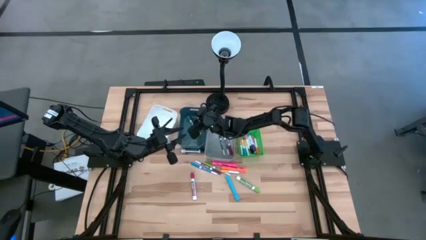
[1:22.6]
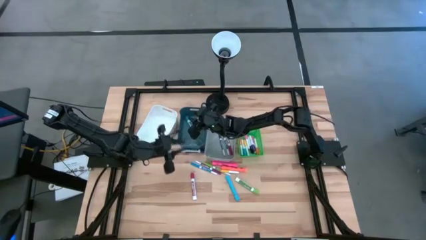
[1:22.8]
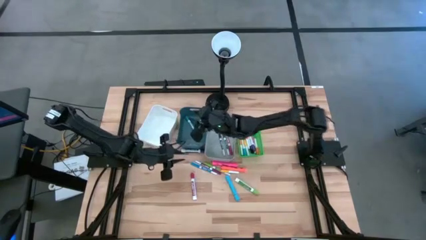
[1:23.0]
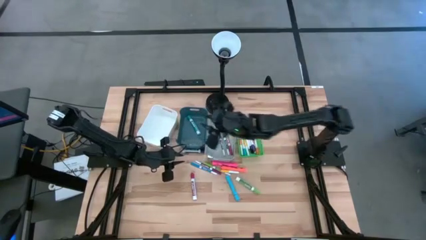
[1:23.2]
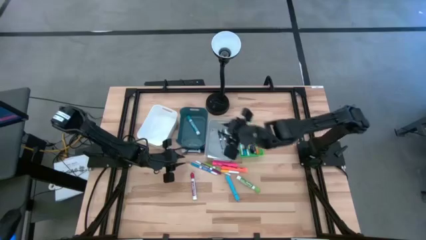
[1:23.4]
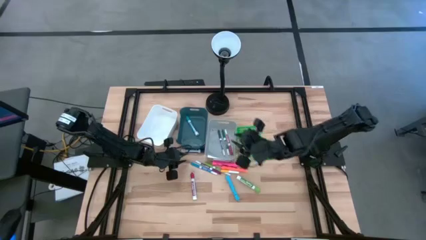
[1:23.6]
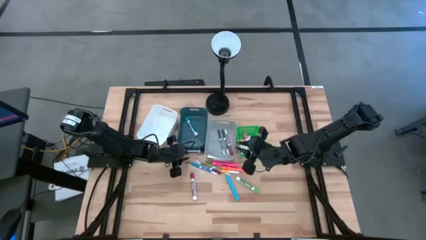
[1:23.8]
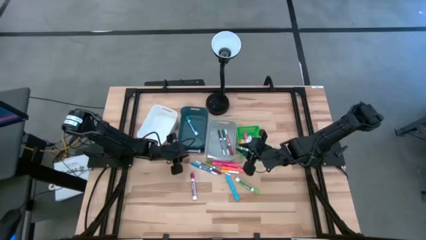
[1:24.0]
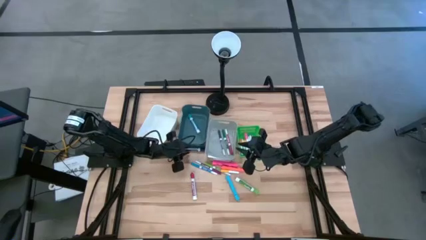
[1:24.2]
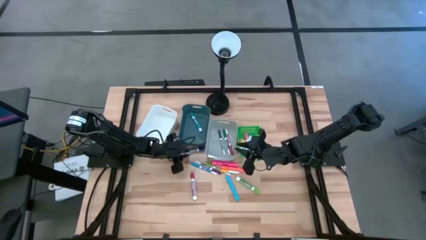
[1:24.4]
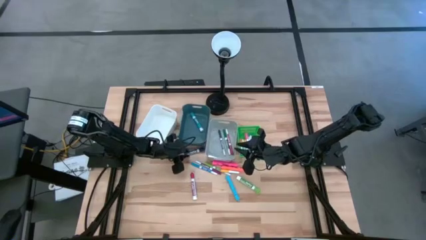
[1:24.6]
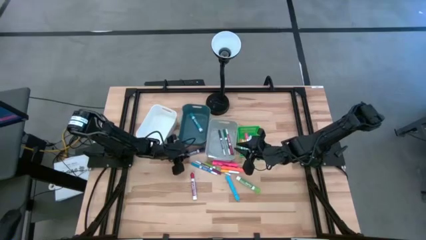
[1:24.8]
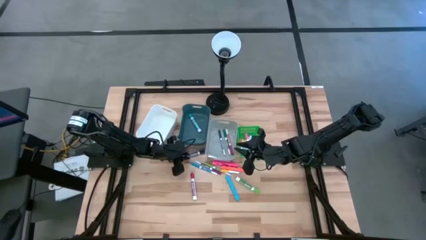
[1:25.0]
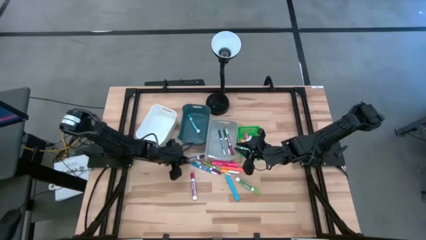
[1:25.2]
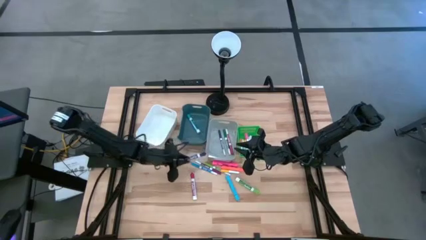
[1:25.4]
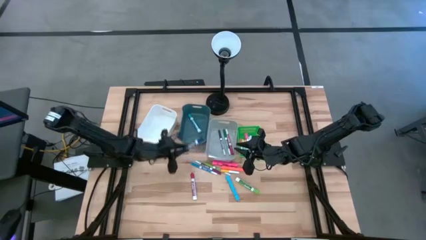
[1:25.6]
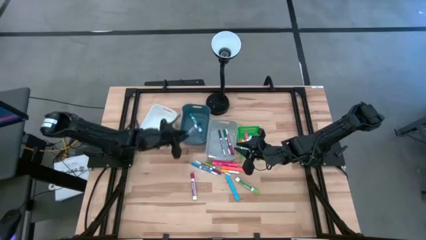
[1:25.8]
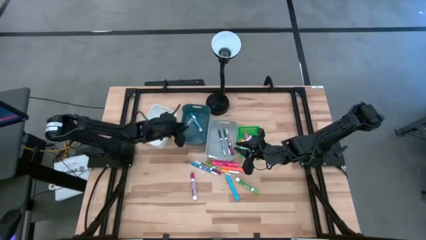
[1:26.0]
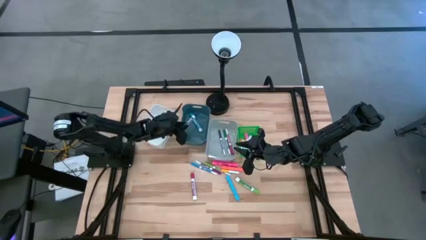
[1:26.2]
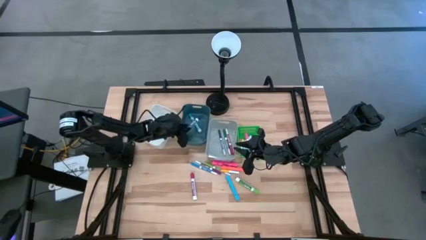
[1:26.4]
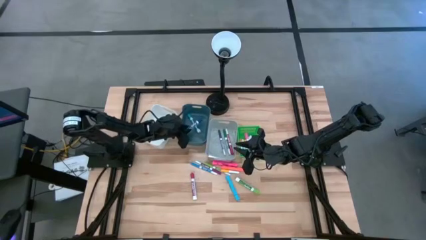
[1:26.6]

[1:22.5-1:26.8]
Task: Pick & Place Markers
Put the large dark blue marker pen into the blue bin

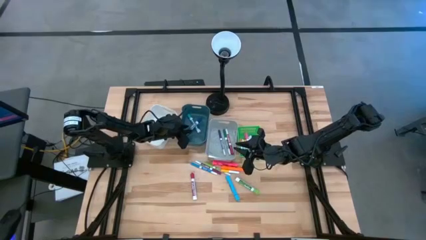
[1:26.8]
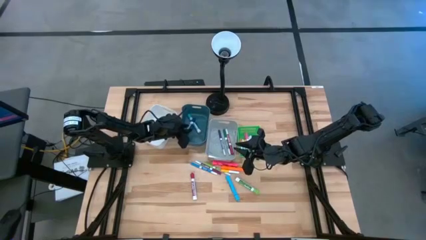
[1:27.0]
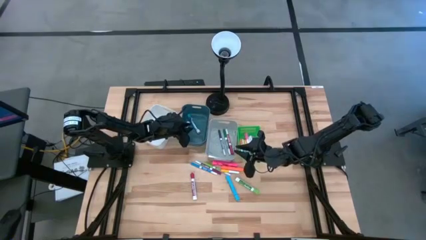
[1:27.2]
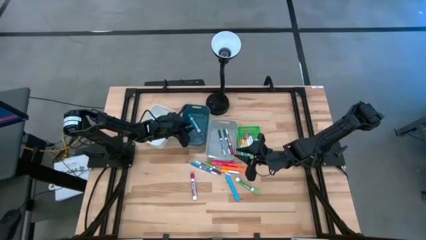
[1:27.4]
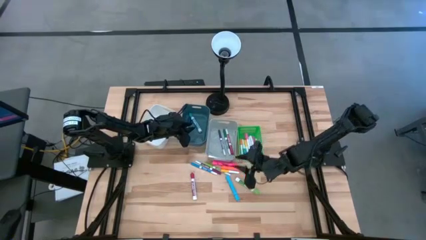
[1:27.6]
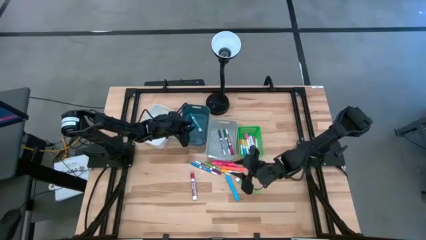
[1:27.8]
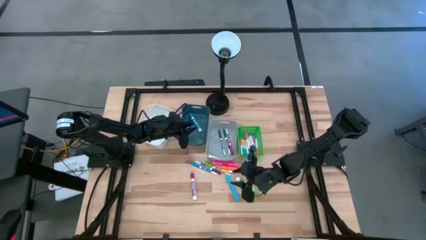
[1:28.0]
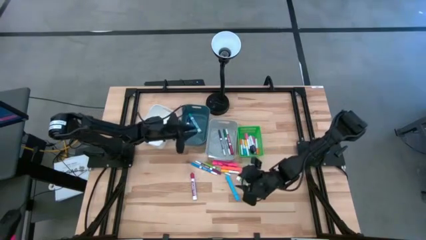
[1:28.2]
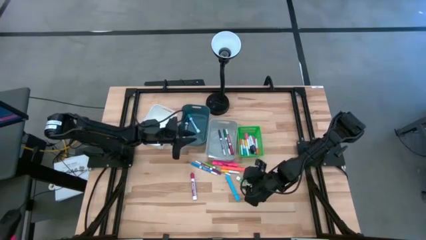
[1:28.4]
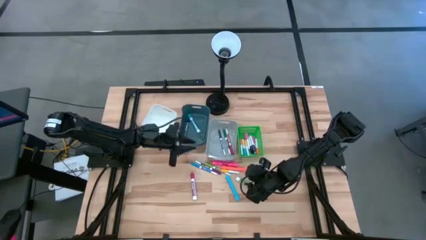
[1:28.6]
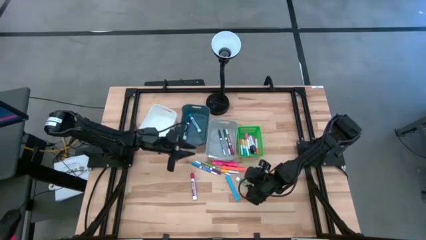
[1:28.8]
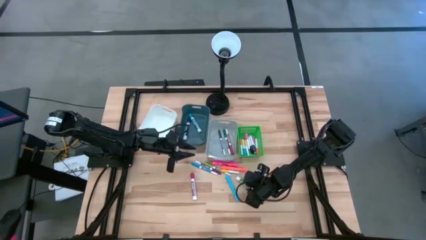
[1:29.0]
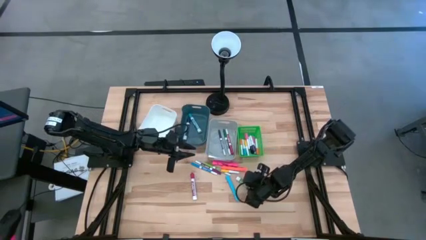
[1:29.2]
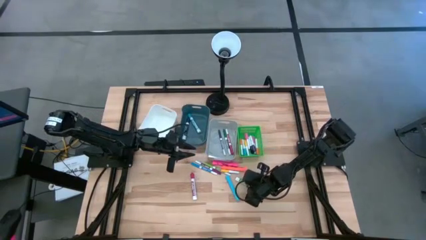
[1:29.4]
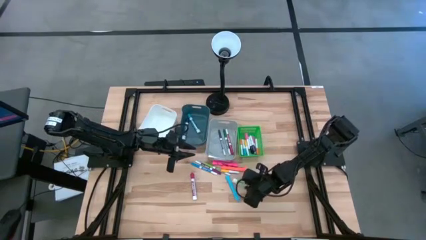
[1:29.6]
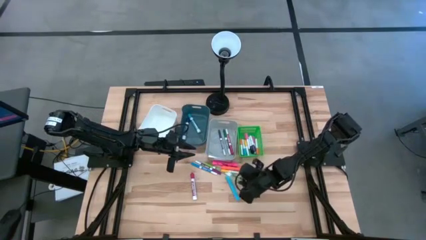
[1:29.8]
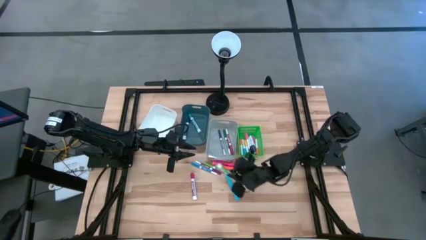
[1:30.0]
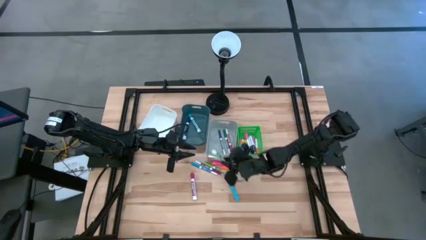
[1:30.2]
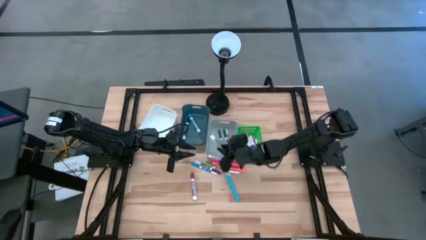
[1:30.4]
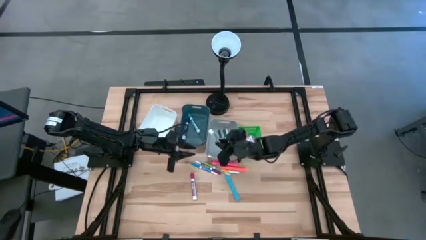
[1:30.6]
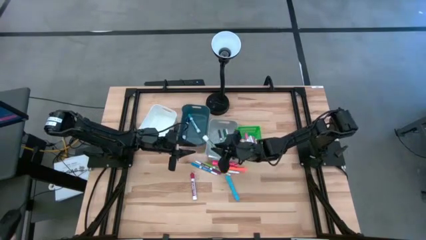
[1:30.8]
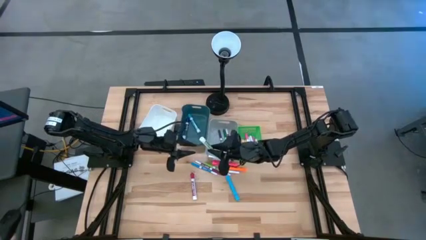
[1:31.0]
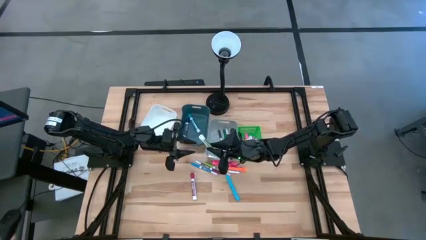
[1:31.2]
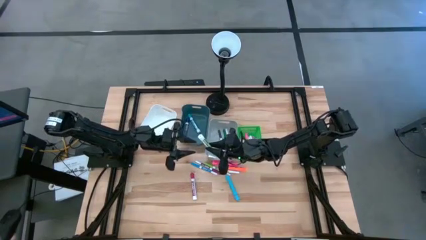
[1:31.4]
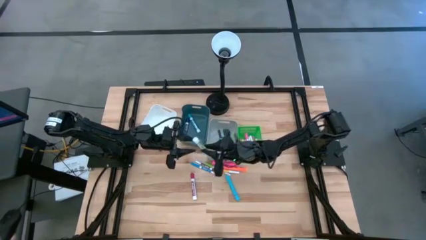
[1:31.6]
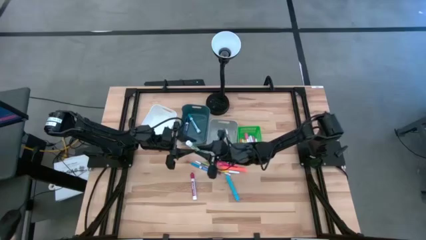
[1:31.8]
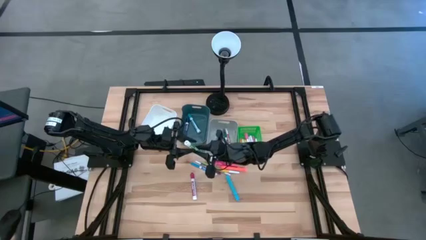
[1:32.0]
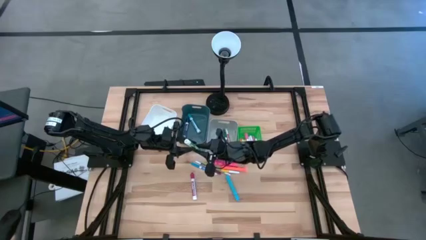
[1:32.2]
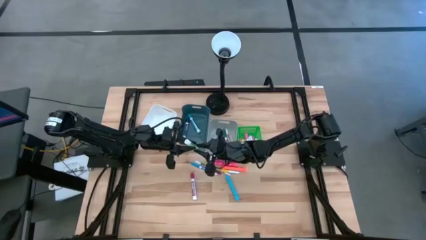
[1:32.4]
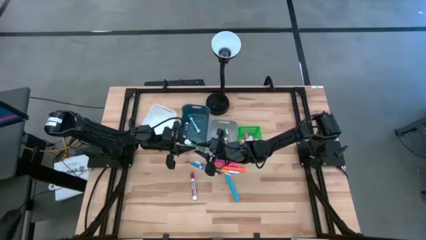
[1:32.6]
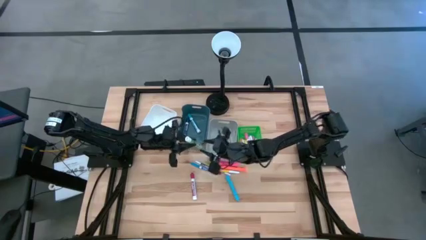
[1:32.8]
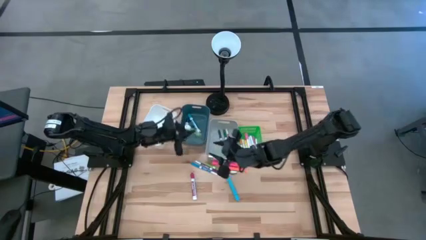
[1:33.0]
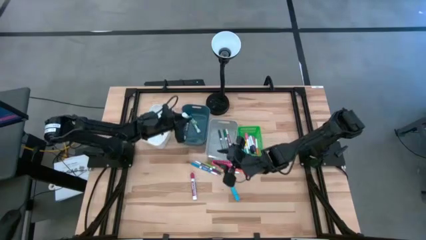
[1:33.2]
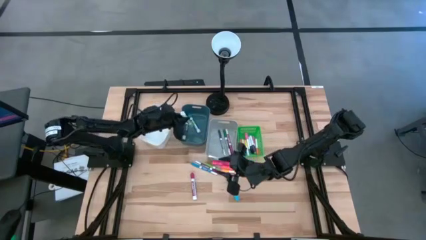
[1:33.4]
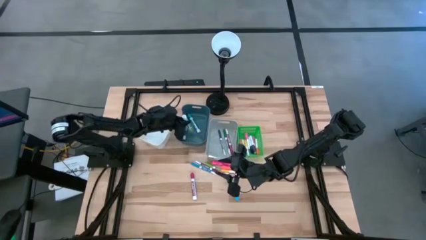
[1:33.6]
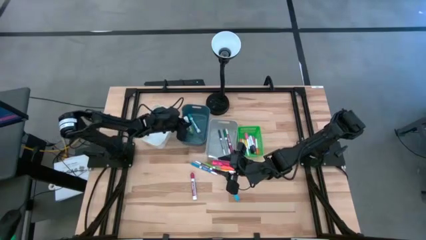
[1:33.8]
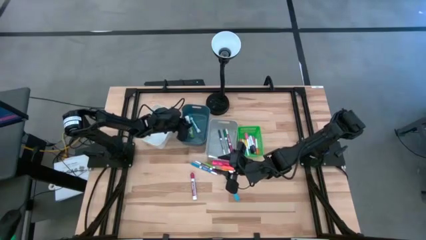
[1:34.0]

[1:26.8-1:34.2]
Put the large green marker pen into the blue bin

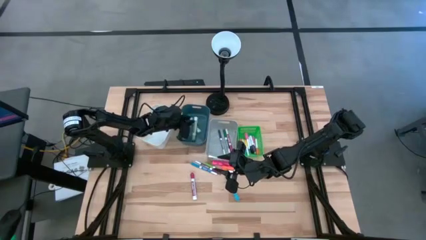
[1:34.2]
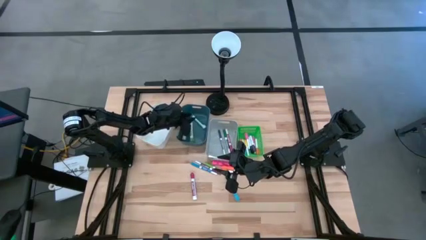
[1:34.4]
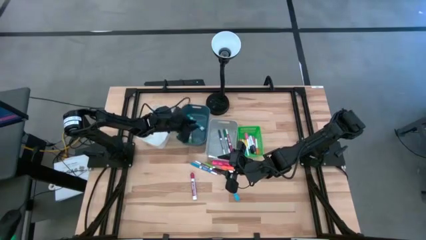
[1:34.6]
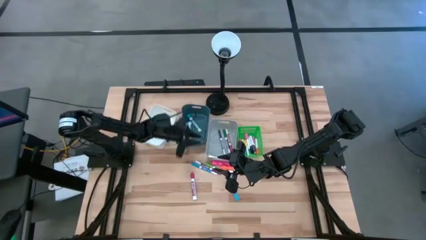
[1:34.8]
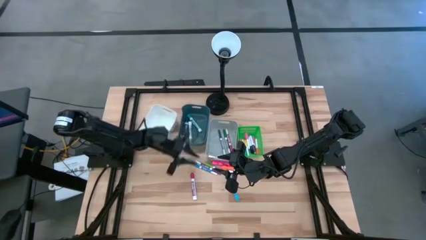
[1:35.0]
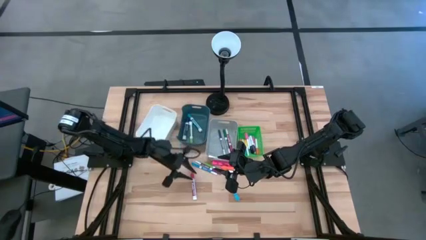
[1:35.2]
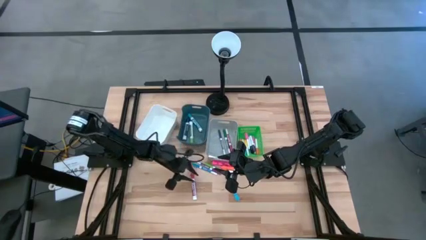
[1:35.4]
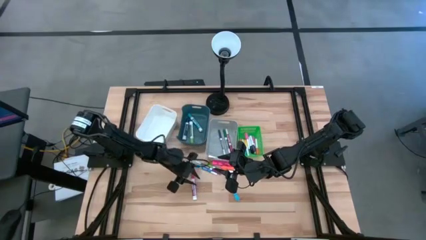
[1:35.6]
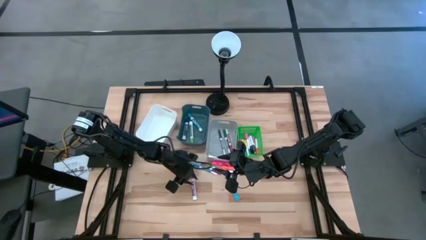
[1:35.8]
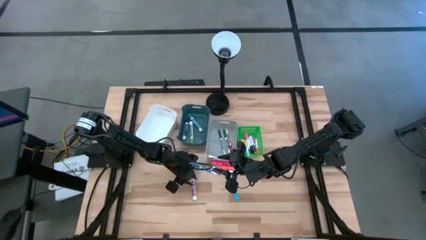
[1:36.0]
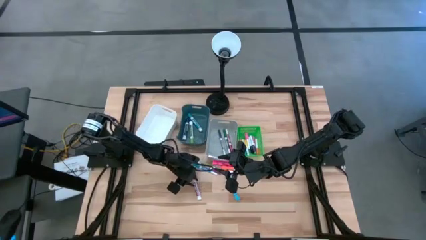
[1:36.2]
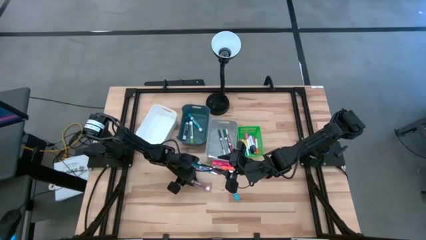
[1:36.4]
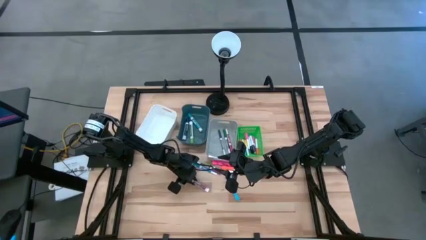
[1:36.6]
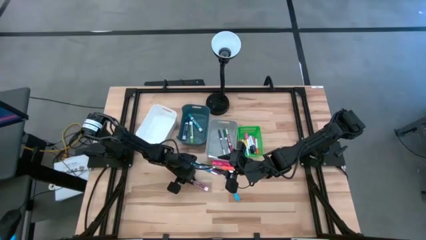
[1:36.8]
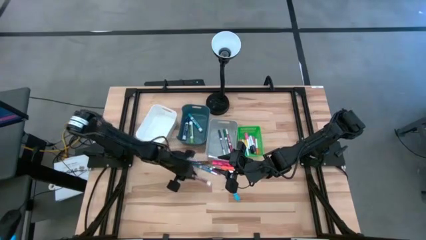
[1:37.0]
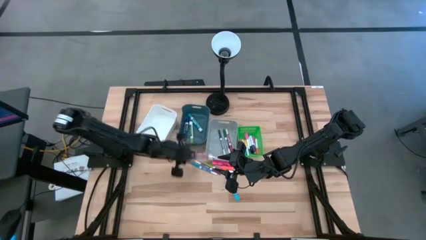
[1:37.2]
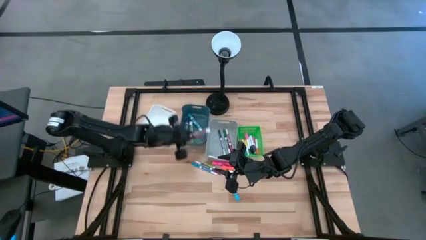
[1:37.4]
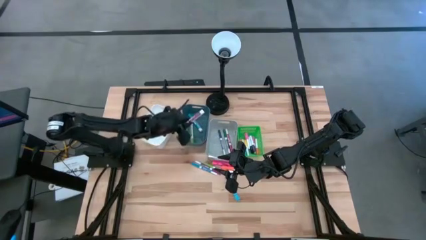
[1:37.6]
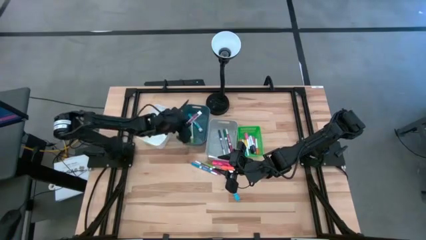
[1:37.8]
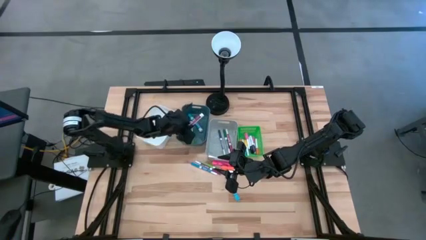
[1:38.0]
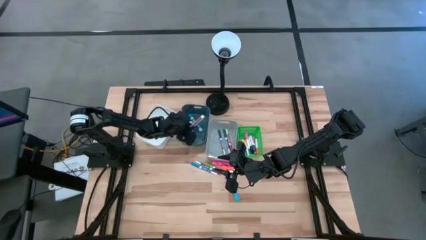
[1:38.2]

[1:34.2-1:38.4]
Put the large red marker pen into the blue bin

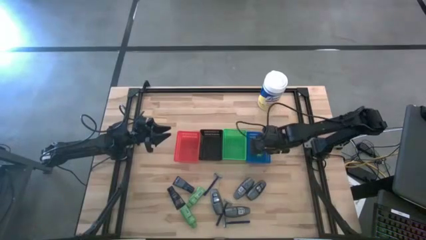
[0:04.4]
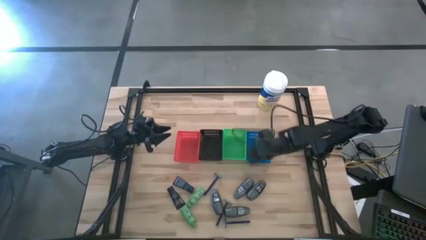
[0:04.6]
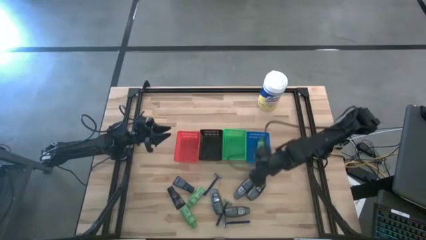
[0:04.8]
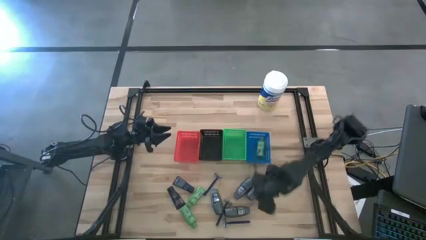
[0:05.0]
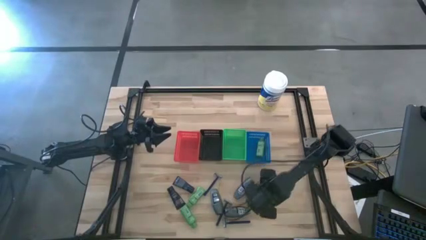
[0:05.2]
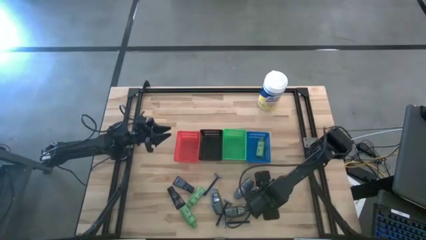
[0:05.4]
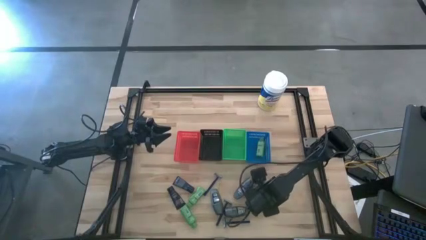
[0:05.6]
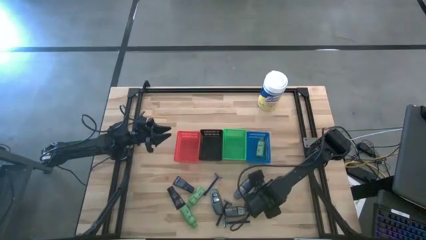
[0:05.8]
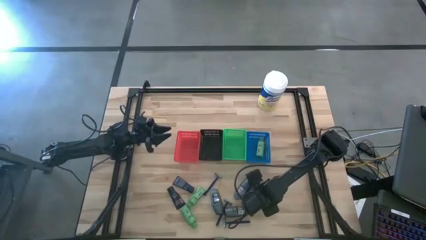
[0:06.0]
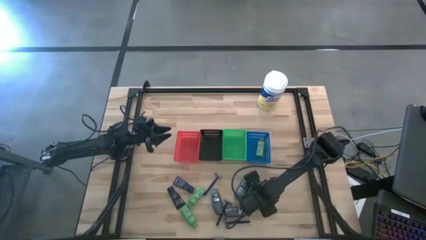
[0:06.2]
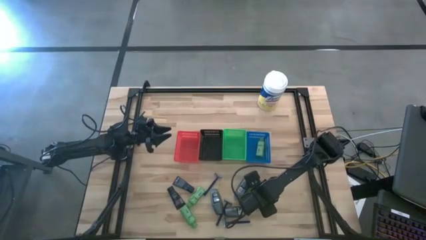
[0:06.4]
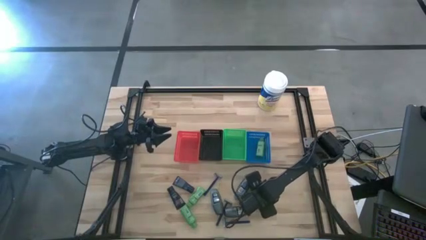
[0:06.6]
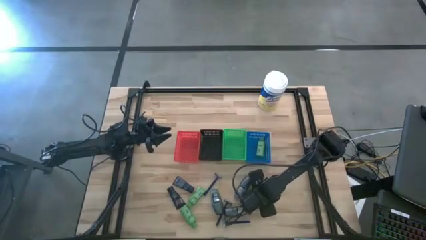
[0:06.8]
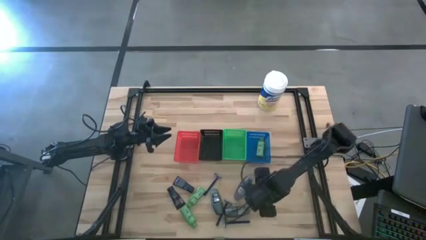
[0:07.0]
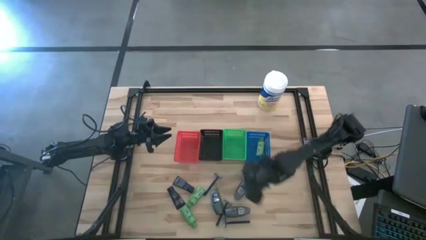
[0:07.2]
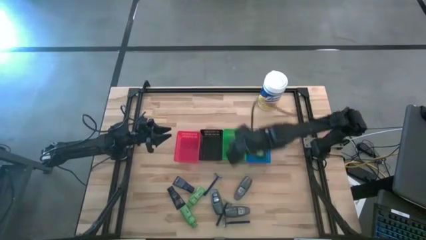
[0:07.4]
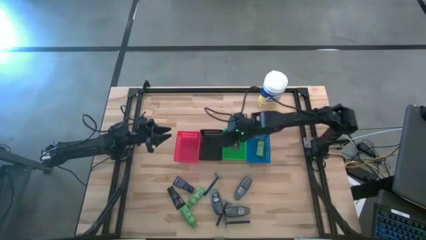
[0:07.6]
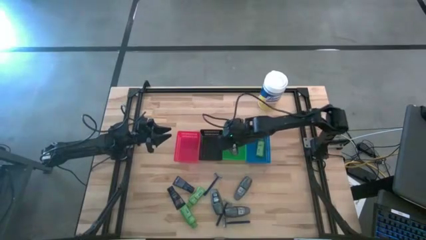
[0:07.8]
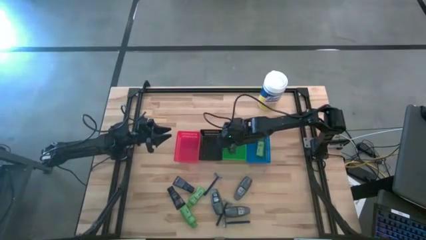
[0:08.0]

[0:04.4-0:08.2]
Task: Pick & Place Travel size toiletries
Put the gray deodorant into the green basket
